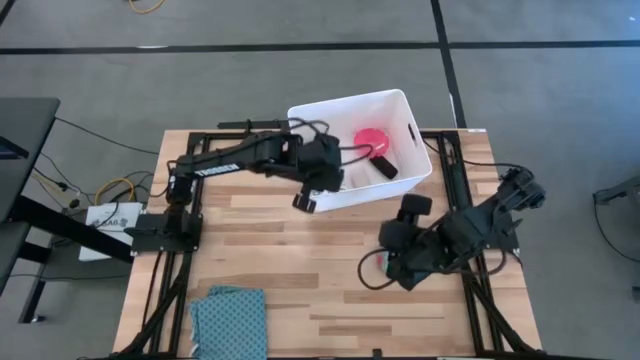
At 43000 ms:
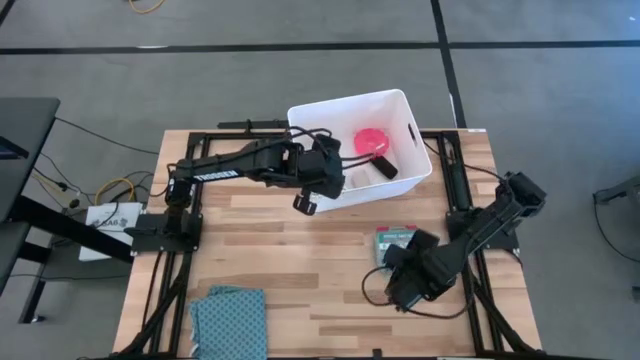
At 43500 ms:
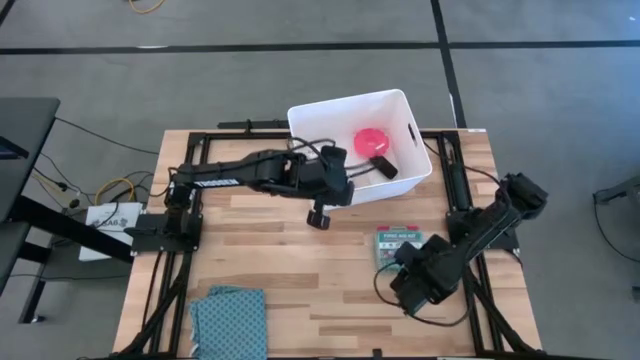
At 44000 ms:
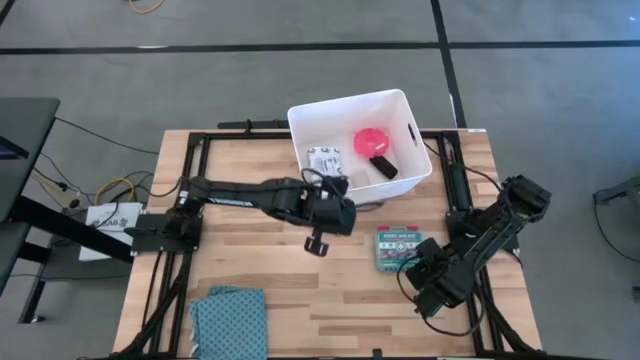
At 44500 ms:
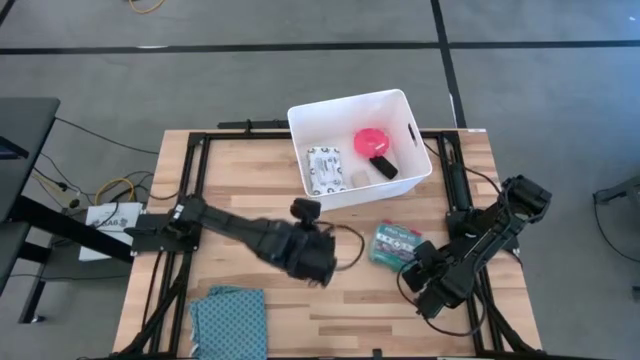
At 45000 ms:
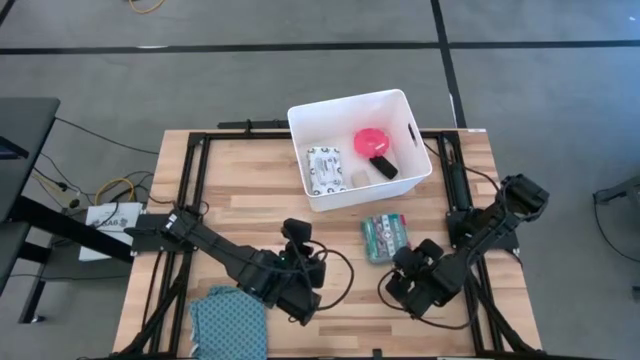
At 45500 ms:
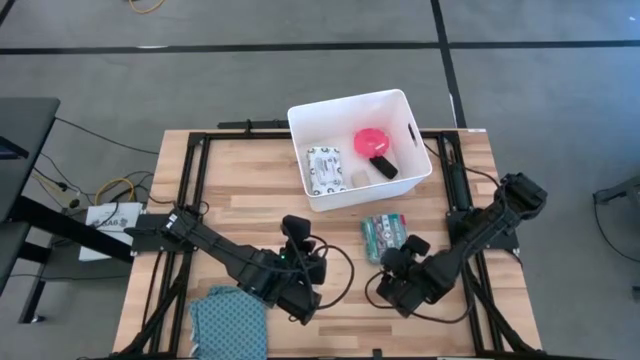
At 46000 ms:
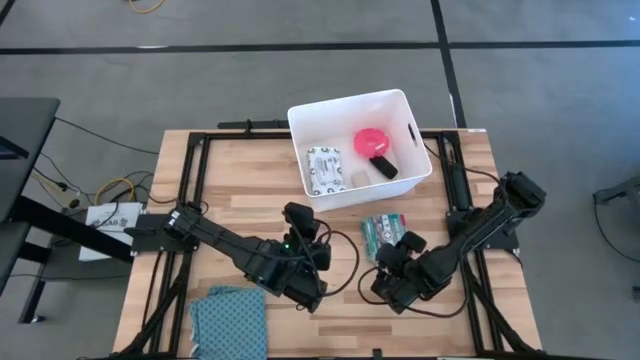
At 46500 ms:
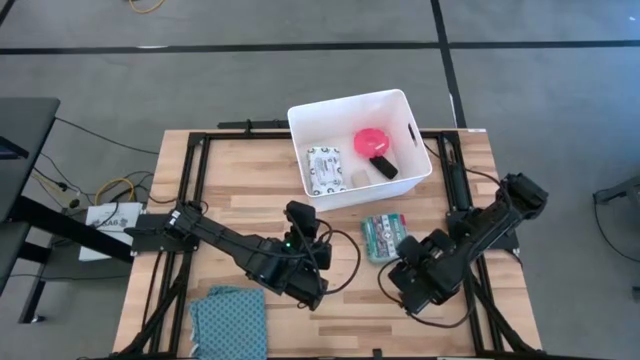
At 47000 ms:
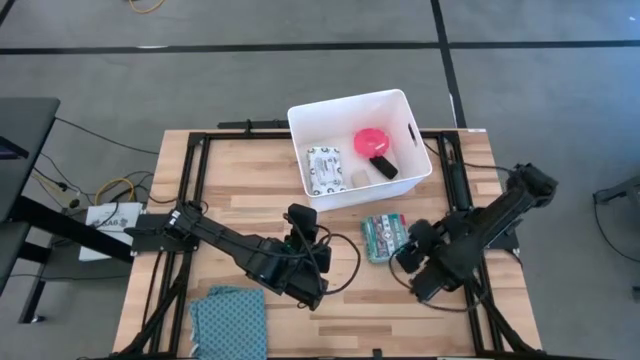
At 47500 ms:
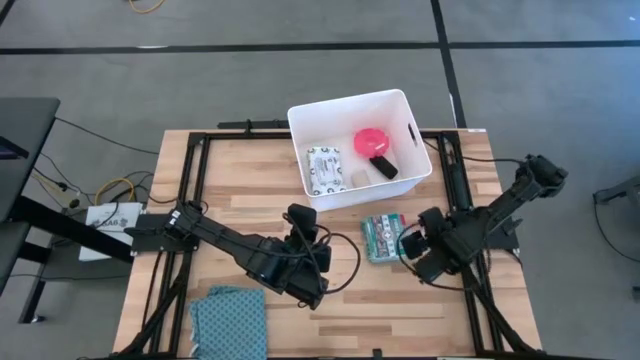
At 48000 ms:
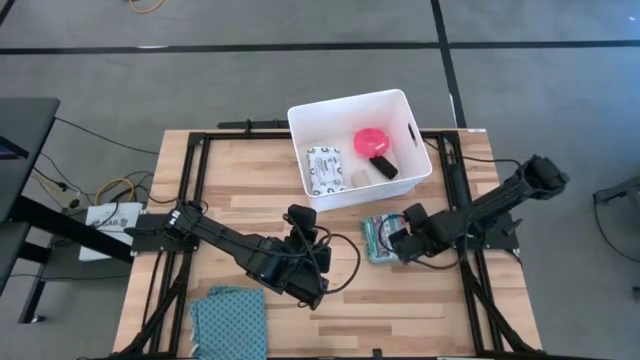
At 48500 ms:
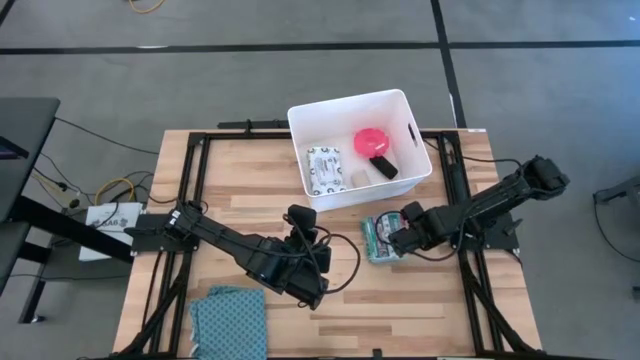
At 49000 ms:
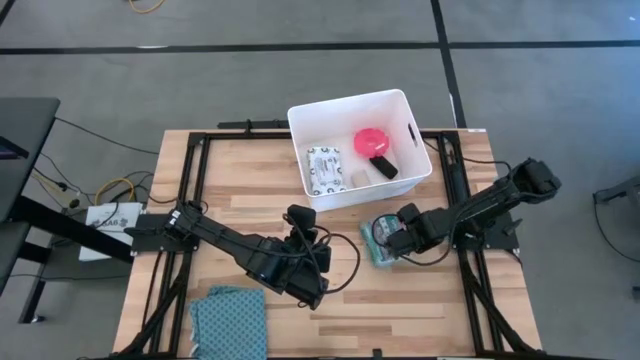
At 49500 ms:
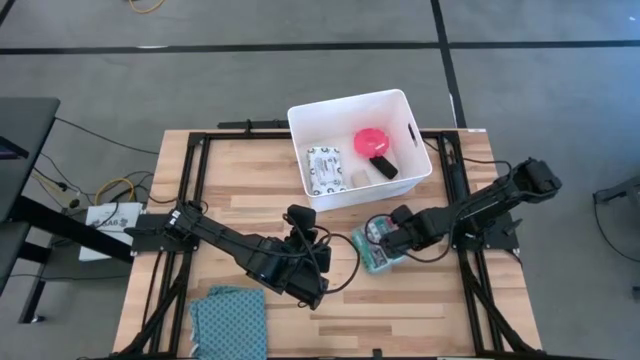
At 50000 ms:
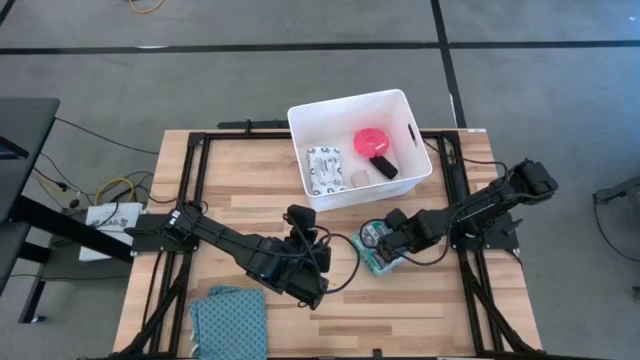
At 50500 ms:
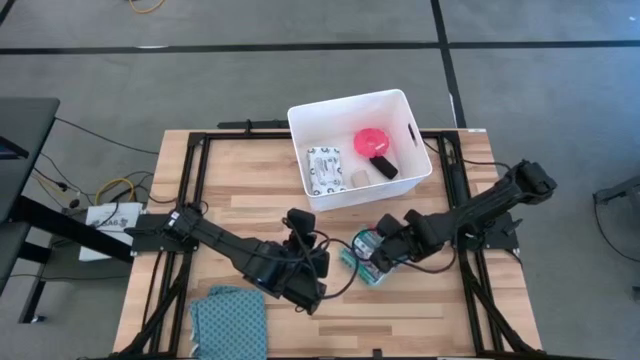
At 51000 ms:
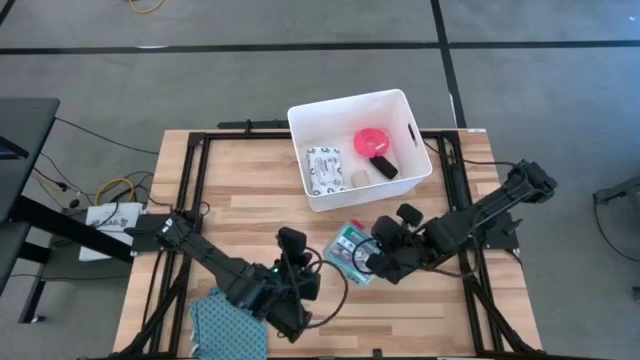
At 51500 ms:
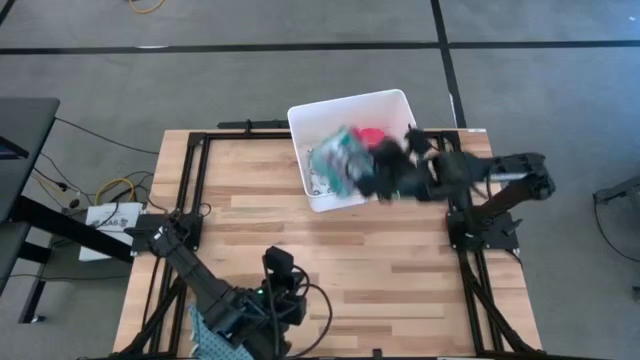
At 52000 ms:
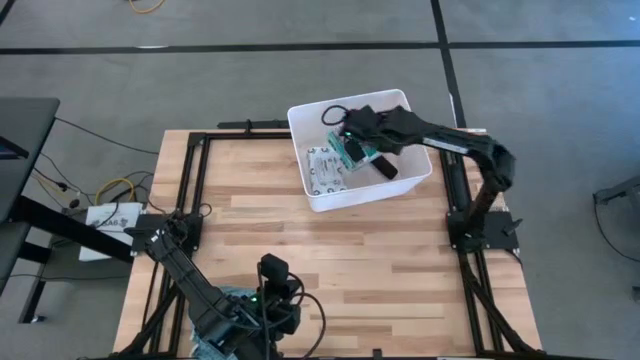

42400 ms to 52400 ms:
Task: Pick & place medical supplies in basket/bin
Put the green first aid kit into the white bin

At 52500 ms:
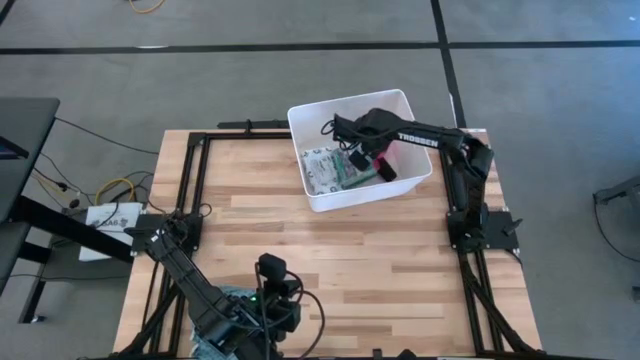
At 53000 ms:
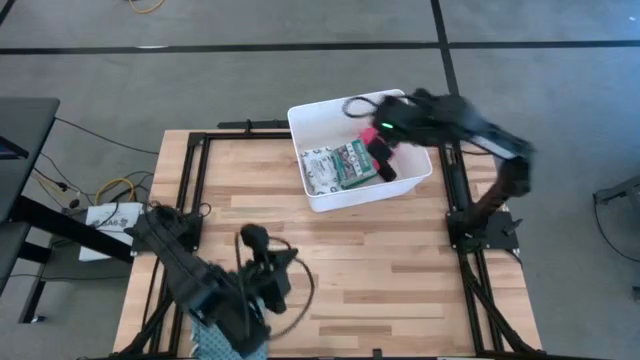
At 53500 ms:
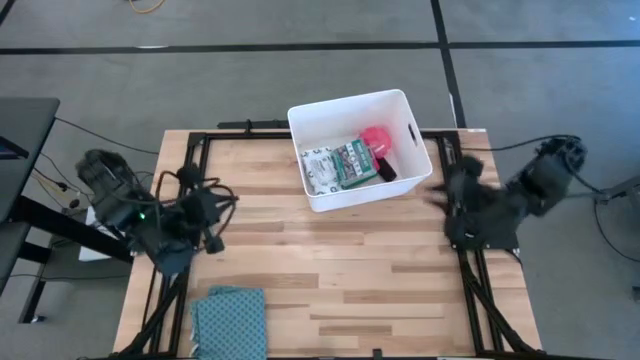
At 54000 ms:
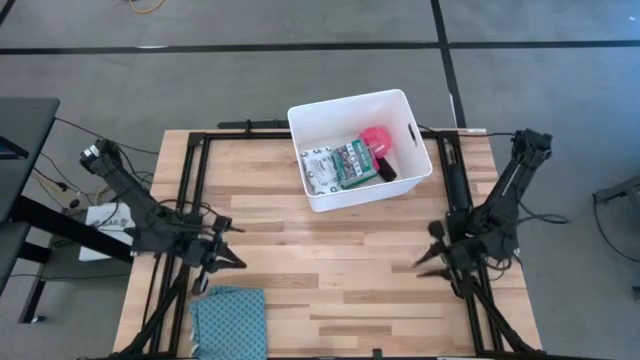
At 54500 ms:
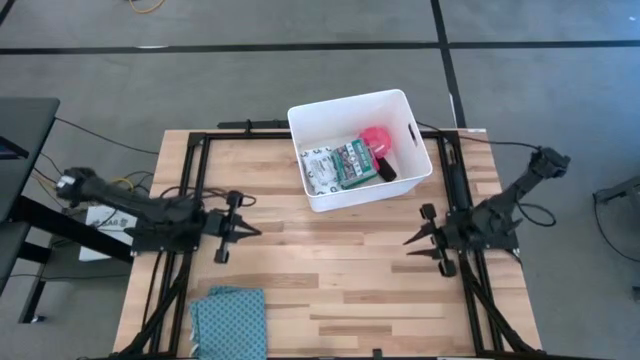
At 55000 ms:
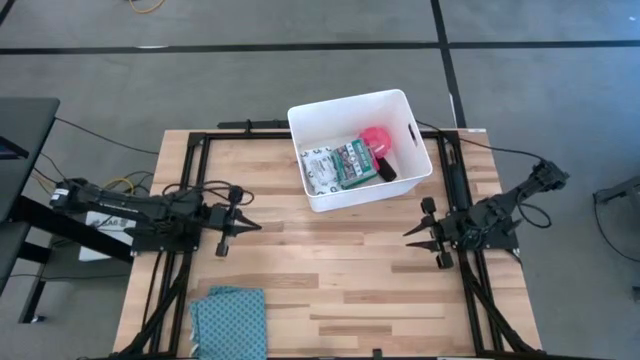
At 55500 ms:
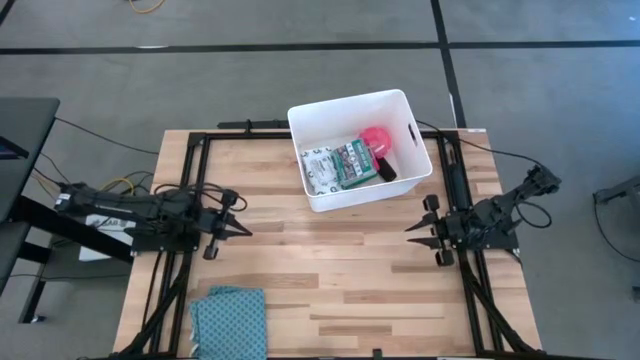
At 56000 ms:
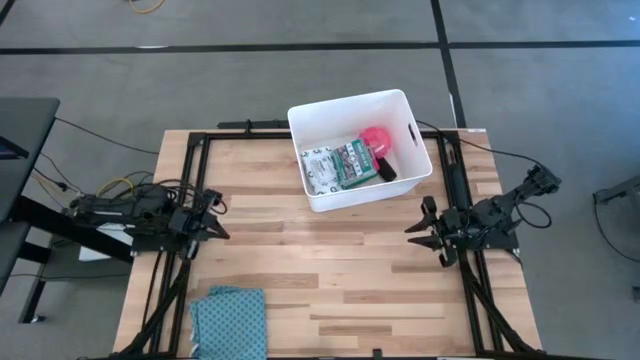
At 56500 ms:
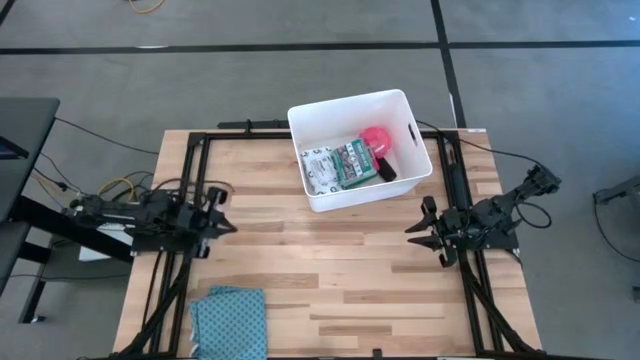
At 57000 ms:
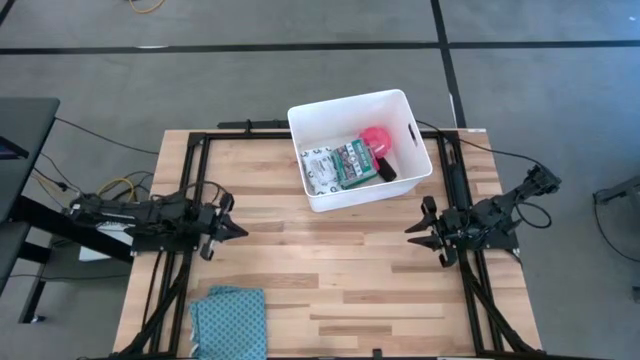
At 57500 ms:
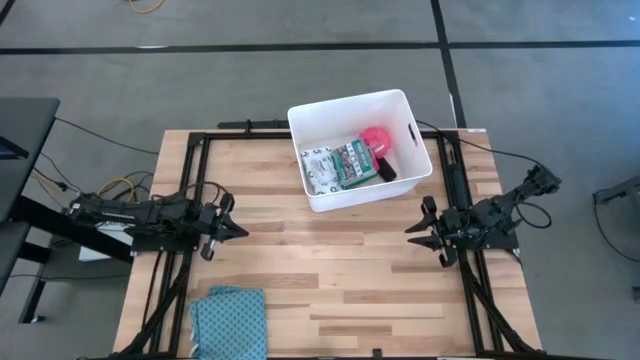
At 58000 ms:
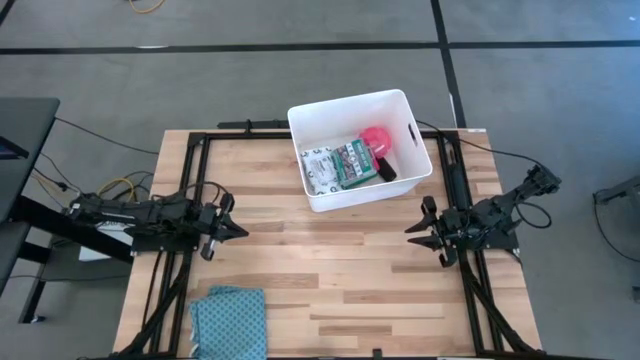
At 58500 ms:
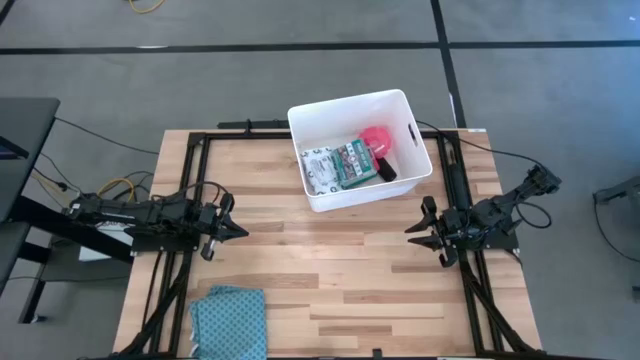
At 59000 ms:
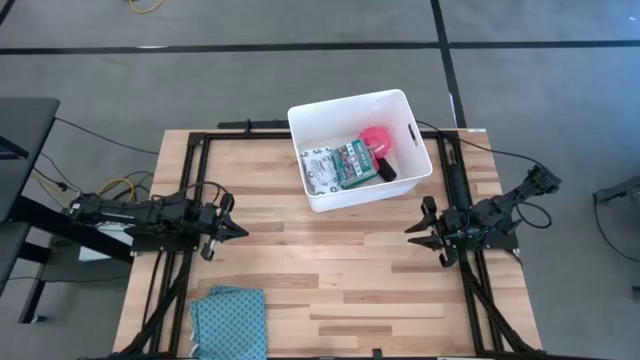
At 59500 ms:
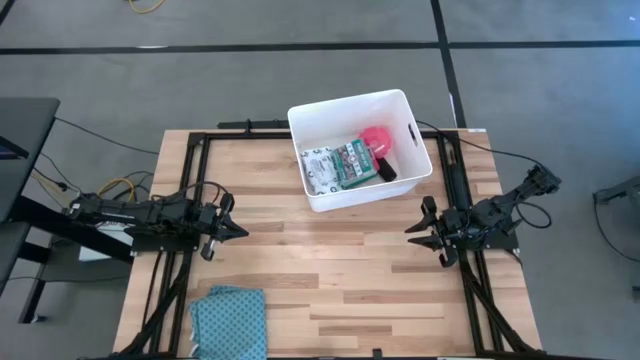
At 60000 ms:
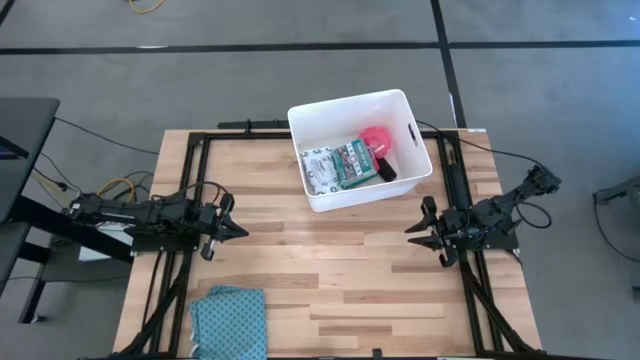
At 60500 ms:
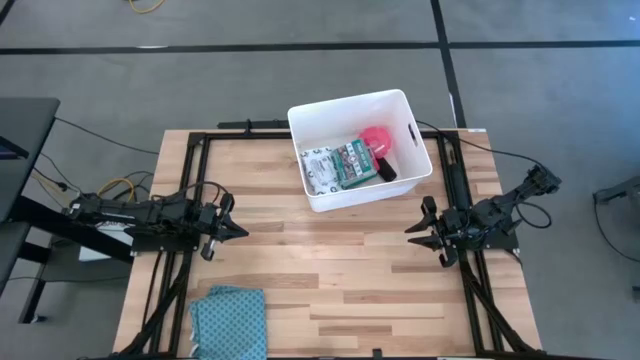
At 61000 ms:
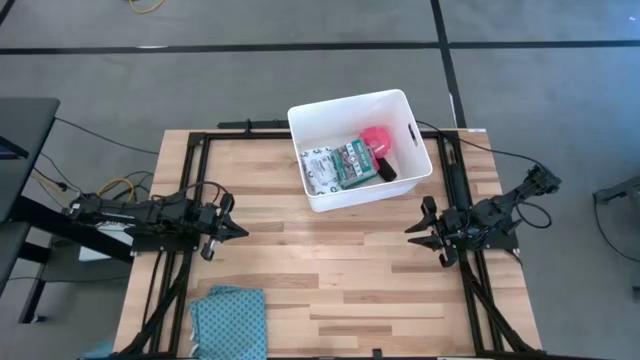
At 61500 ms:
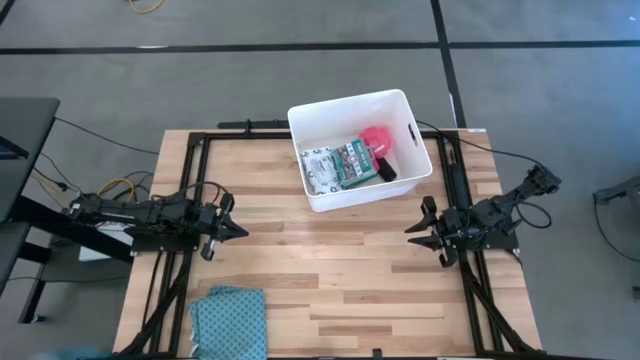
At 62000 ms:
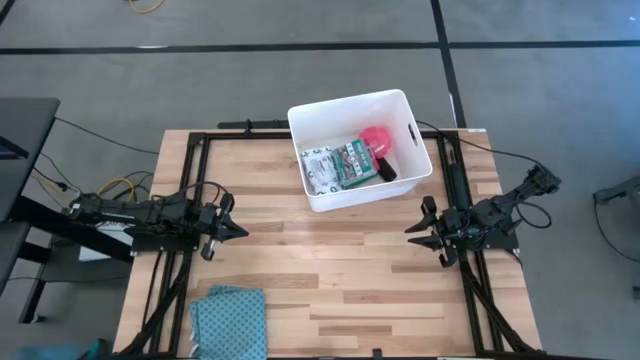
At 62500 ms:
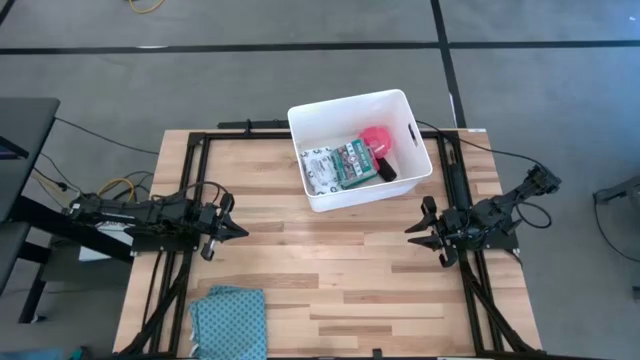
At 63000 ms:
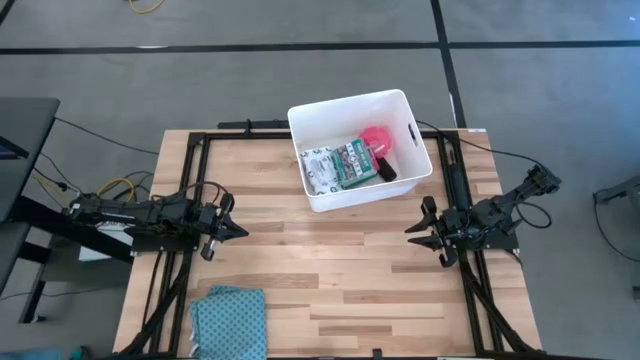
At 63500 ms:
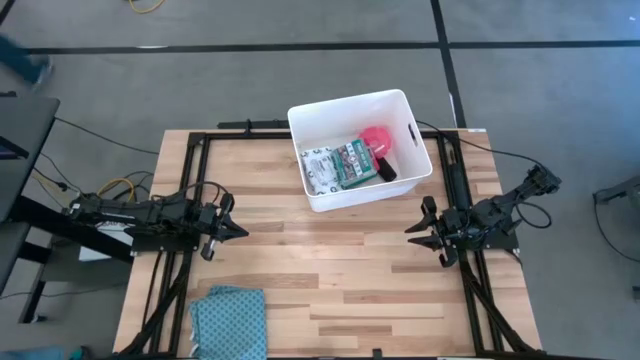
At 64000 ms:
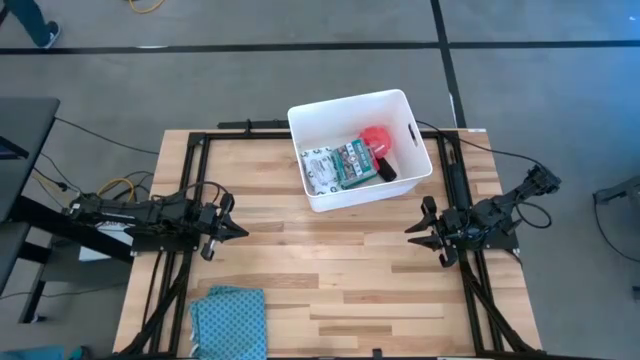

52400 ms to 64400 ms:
Return to Home Position
